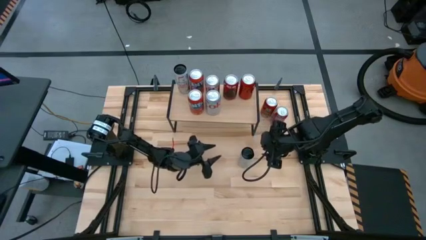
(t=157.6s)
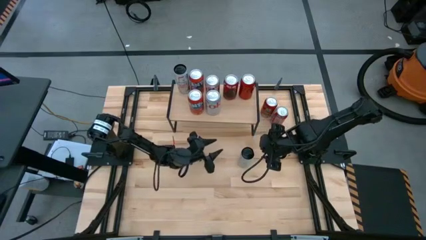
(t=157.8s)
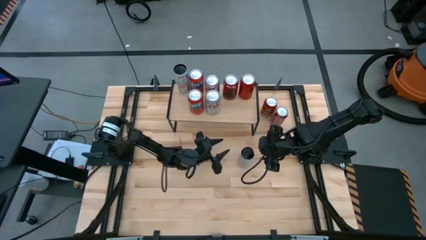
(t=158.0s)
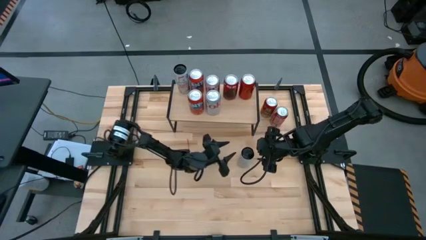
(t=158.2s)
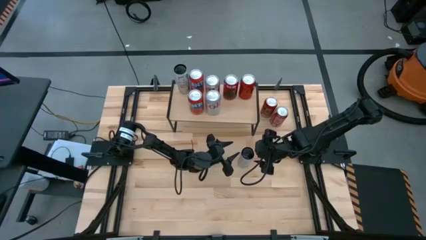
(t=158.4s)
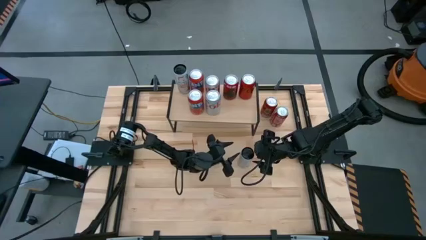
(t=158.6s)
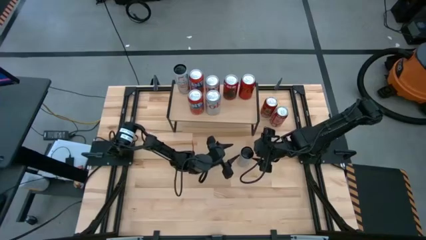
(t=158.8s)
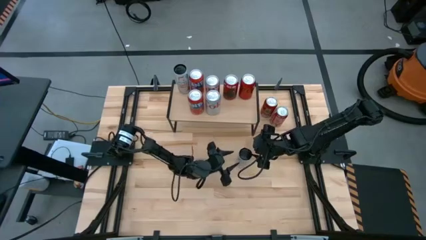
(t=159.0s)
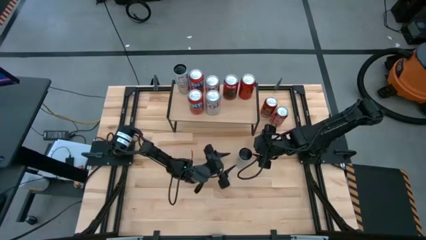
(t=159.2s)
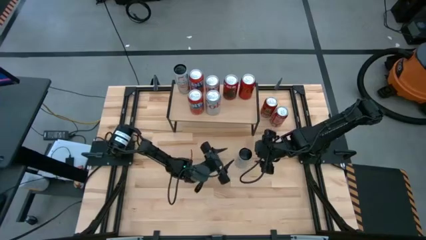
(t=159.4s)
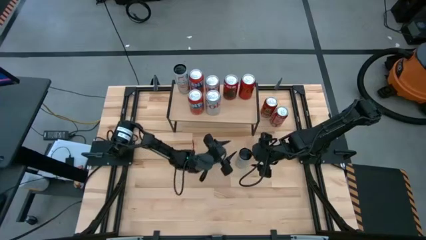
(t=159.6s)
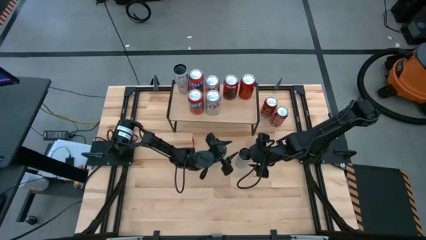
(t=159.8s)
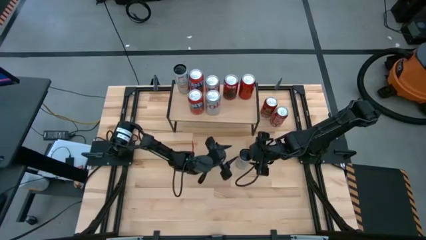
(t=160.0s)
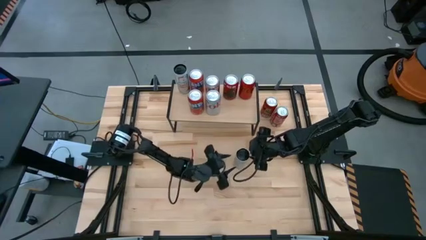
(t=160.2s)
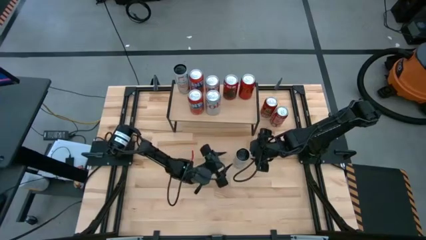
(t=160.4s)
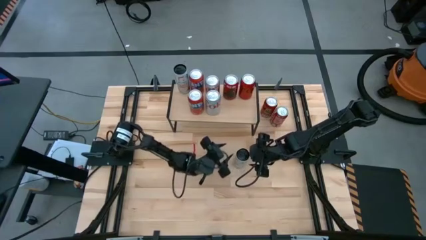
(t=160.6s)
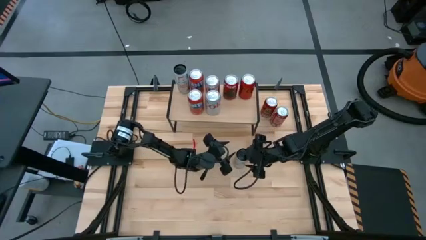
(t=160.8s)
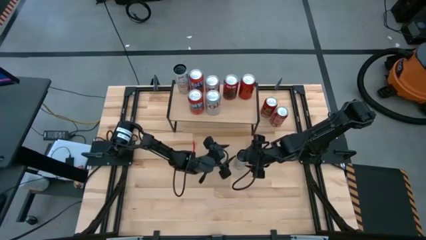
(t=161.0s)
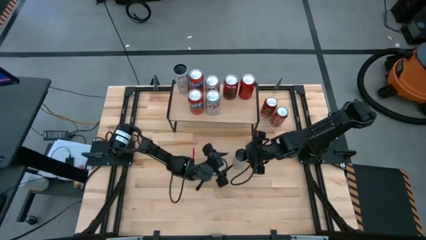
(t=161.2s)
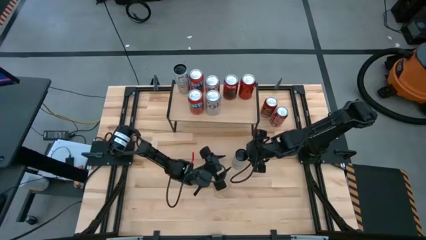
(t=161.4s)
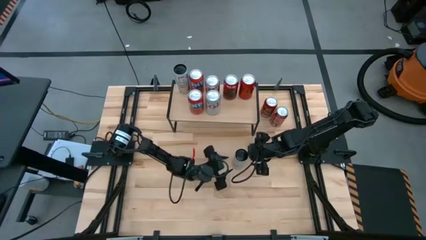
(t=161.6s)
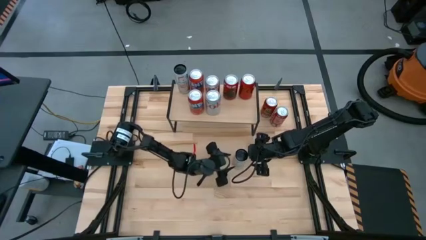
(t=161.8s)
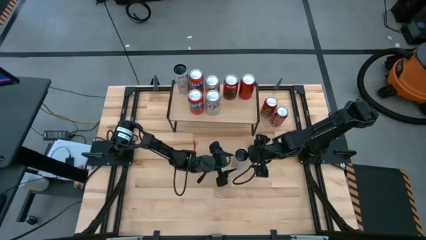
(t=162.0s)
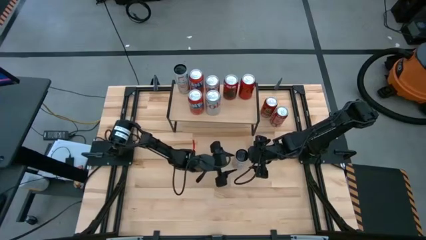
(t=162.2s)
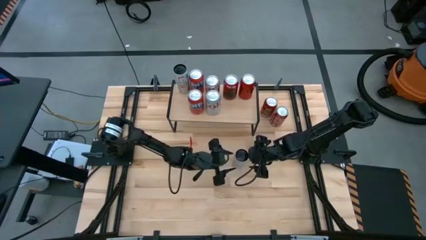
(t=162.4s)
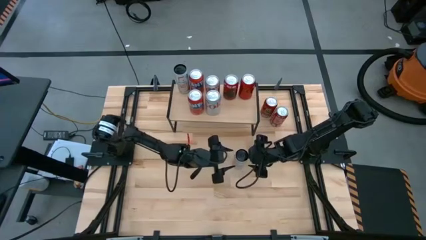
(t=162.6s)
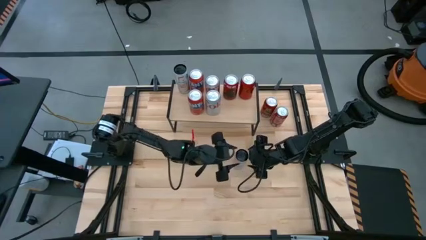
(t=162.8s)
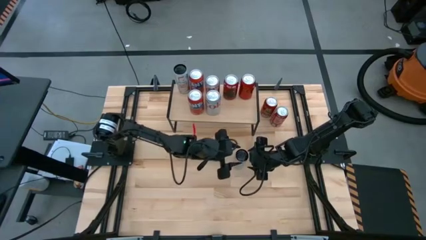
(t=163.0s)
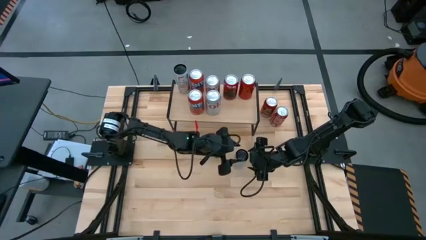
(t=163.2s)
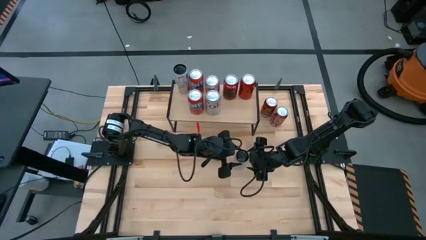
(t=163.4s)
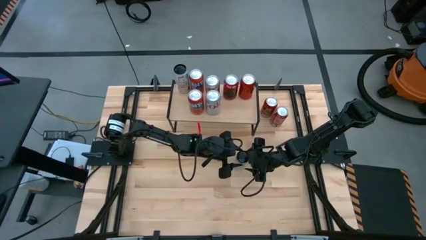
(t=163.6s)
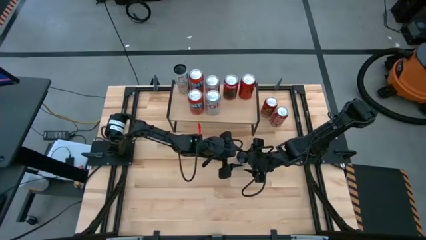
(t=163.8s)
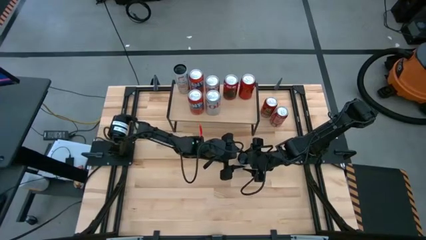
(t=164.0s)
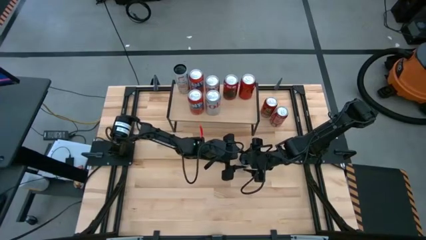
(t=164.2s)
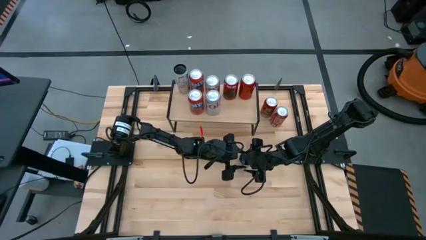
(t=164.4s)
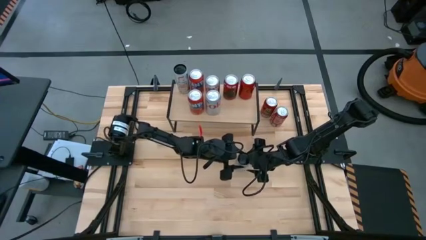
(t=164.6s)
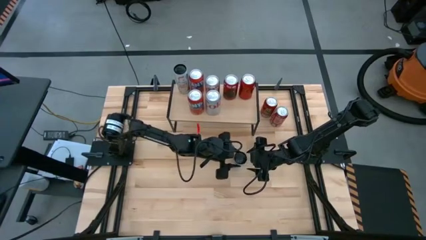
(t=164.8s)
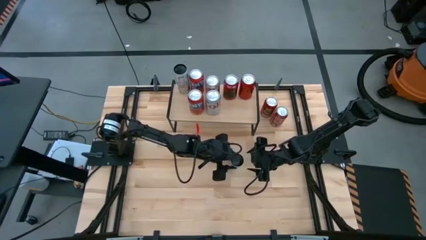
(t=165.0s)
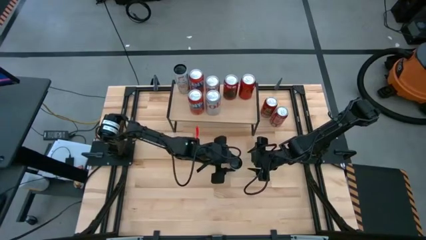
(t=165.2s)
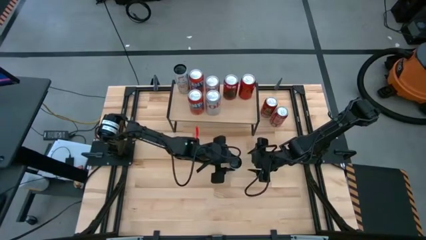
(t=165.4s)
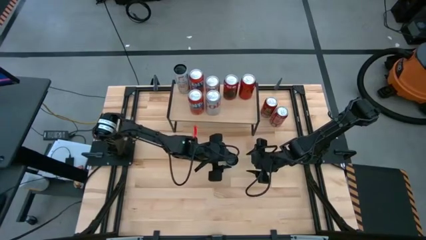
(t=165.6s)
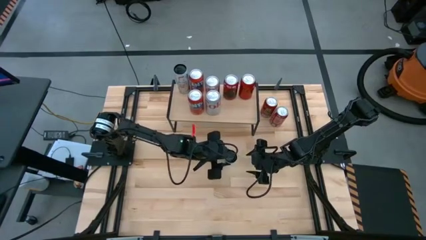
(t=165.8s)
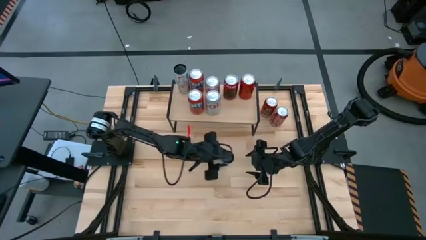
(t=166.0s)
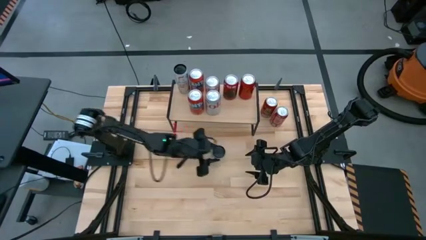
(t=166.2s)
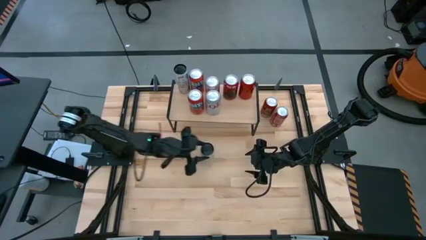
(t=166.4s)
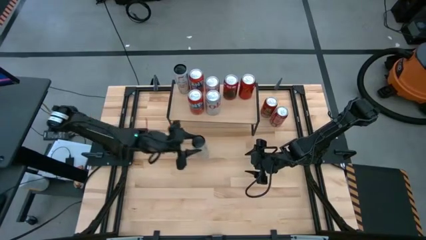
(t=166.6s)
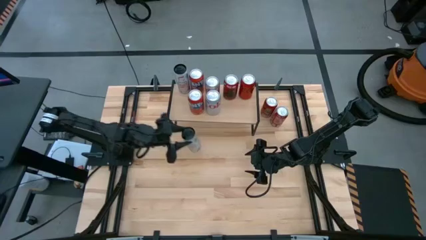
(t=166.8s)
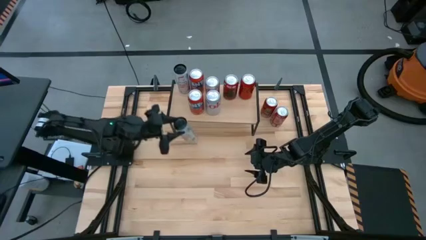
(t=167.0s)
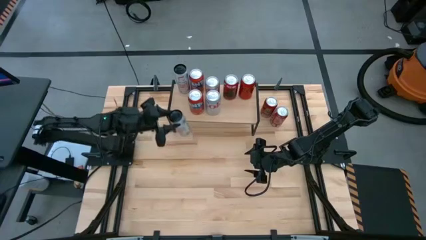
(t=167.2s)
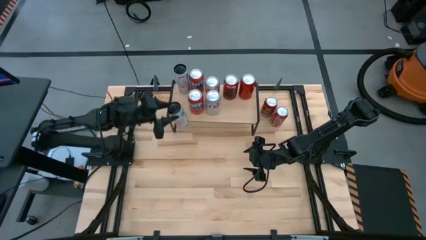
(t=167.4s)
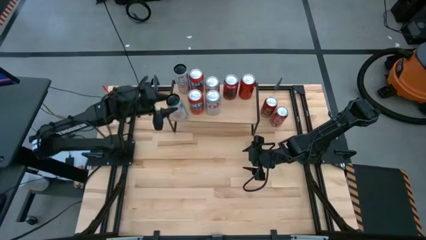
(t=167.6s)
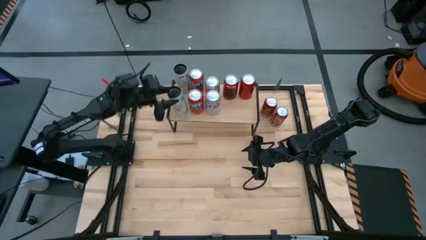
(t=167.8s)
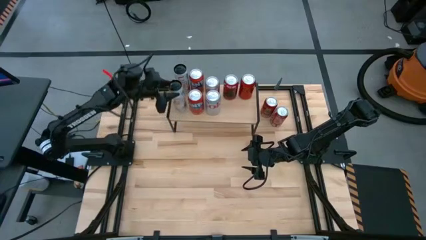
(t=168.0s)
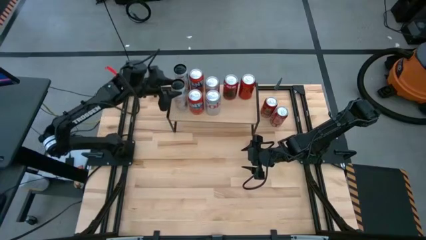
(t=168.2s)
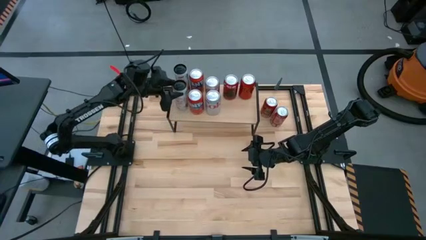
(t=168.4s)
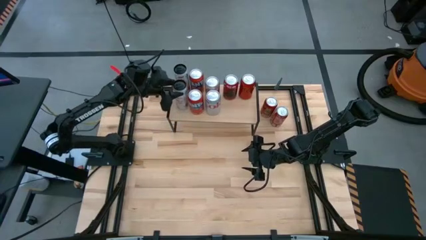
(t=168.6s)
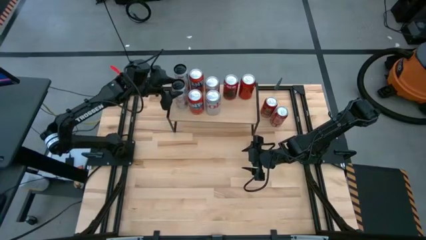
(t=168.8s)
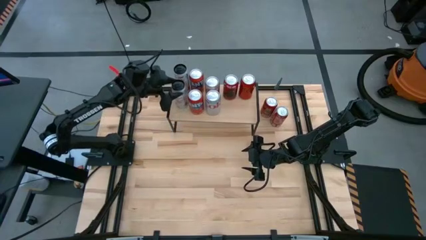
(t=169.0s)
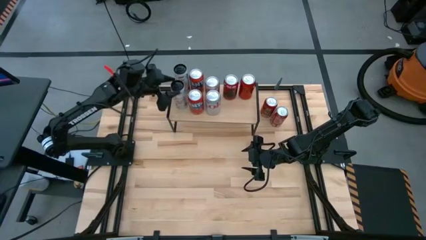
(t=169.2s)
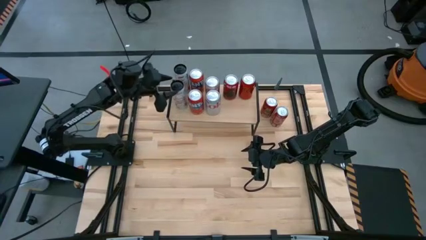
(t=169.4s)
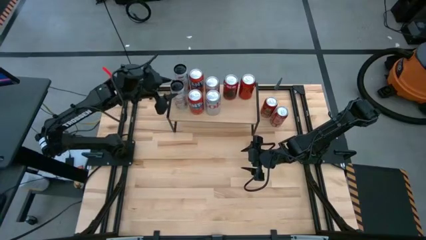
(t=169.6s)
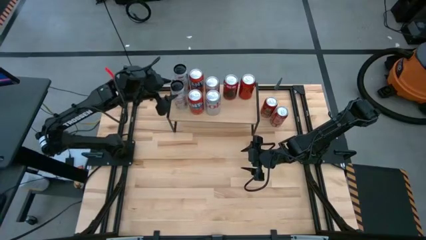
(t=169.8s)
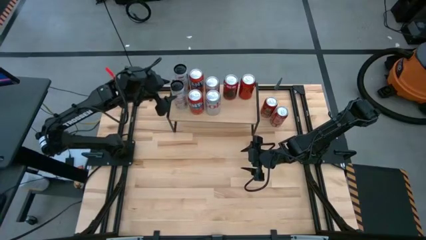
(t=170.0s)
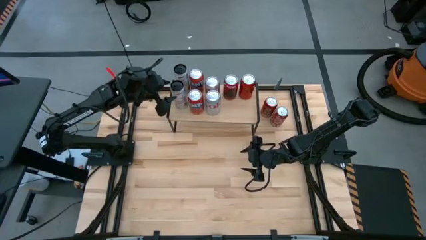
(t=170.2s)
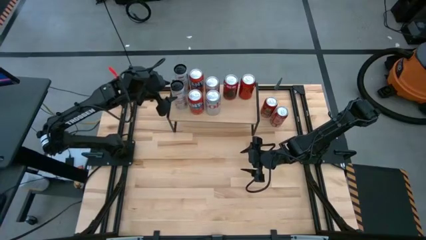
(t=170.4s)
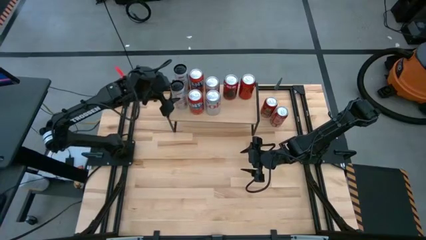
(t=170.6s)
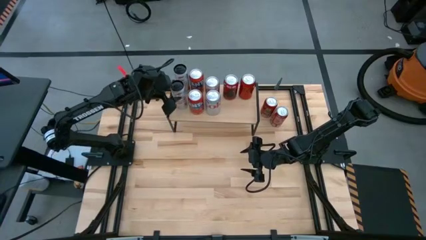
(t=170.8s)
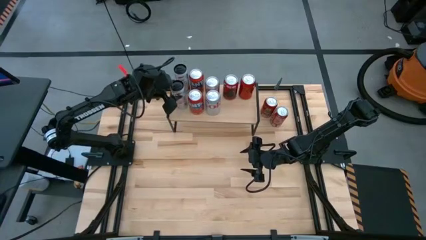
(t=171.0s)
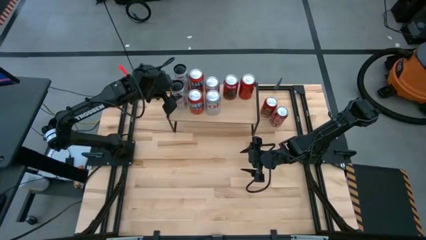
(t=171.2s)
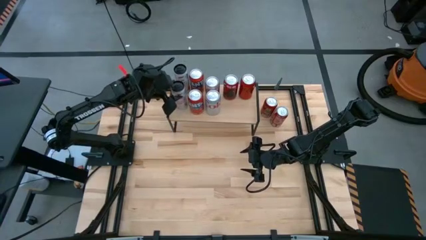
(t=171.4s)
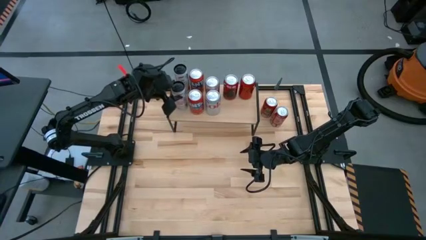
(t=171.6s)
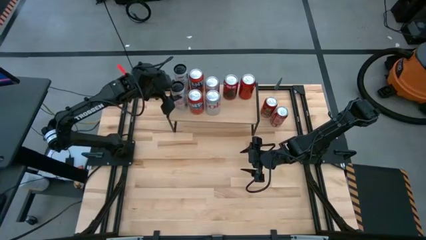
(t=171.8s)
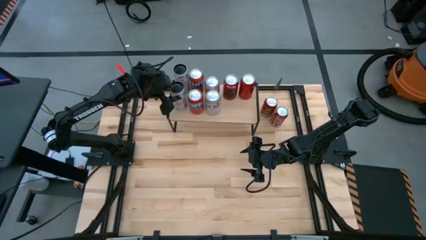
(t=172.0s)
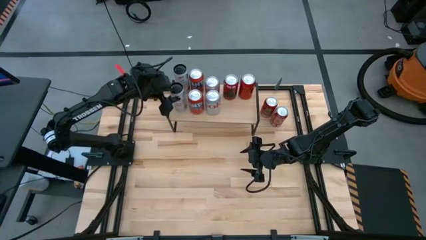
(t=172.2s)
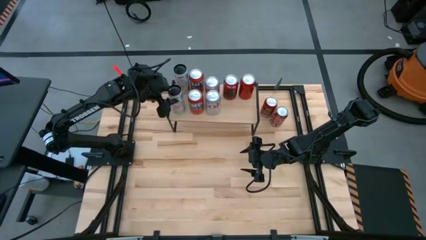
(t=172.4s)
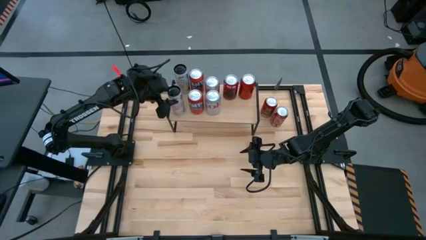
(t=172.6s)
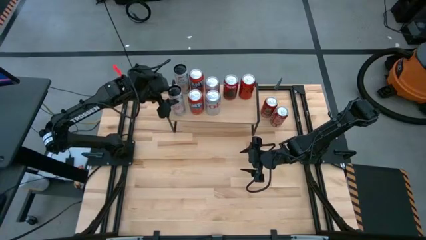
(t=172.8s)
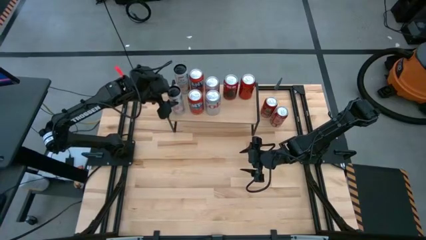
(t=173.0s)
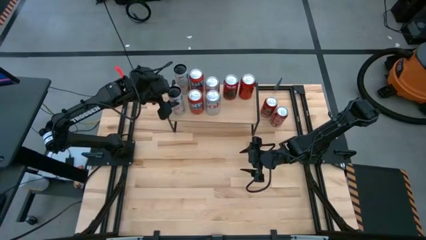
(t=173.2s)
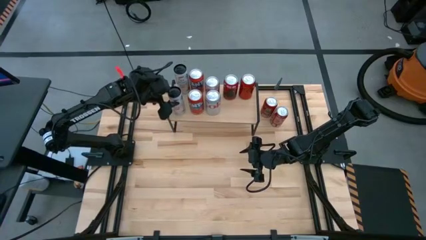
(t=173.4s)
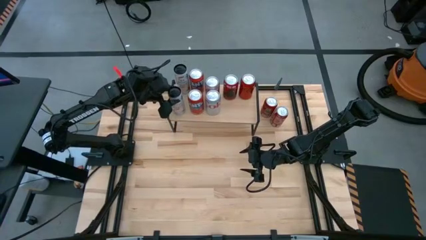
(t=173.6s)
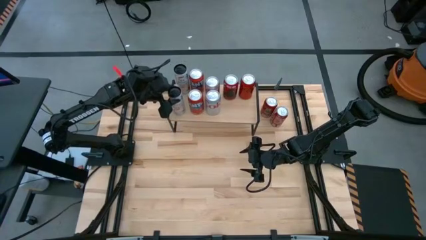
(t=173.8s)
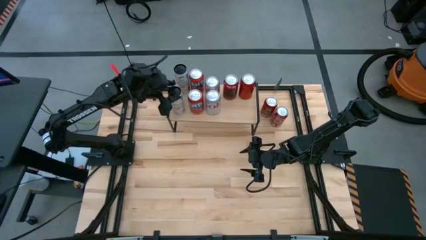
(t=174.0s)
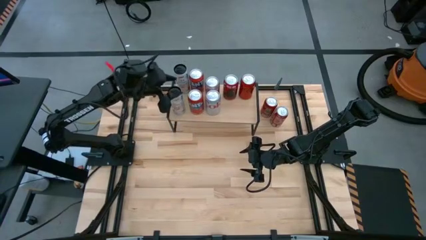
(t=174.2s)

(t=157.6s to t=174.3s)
Task: Place canned beverage on shelf
Put the white soda can on the shelf aligned with the other white soda can
